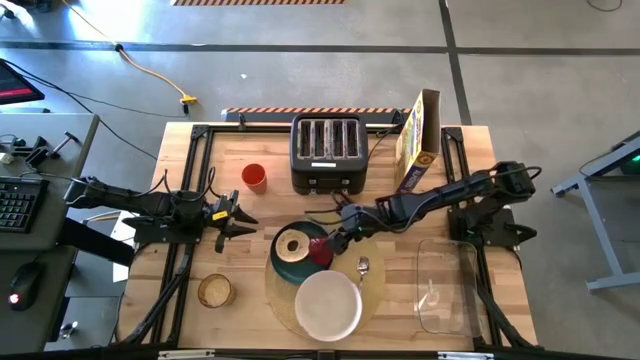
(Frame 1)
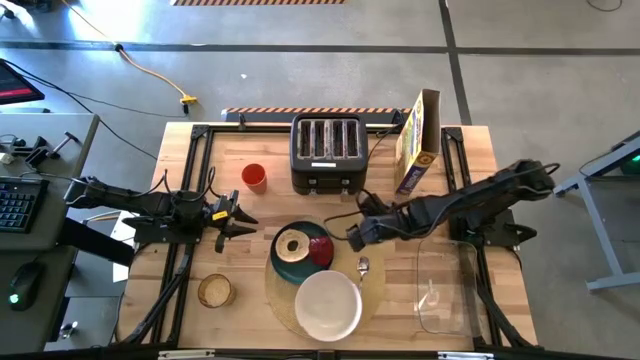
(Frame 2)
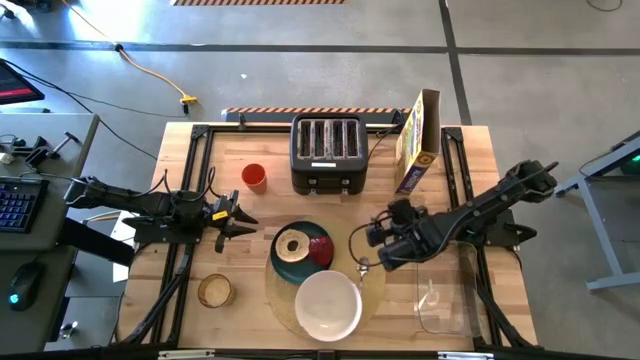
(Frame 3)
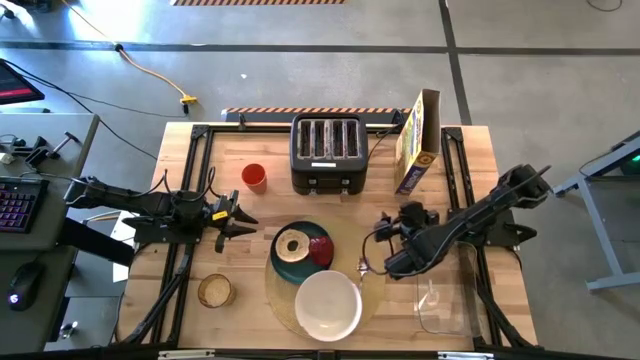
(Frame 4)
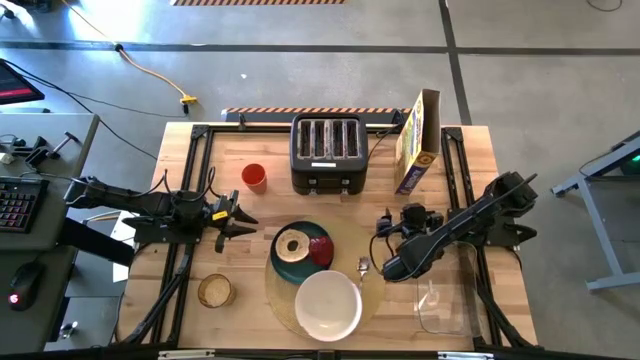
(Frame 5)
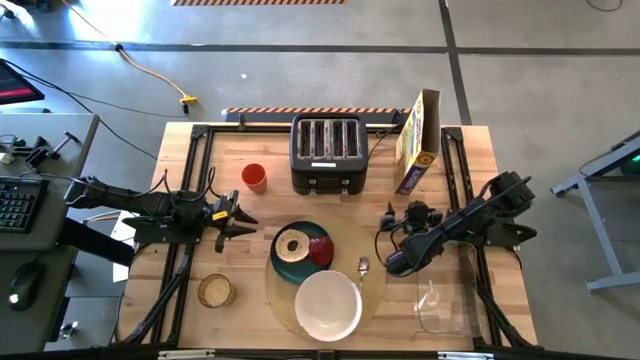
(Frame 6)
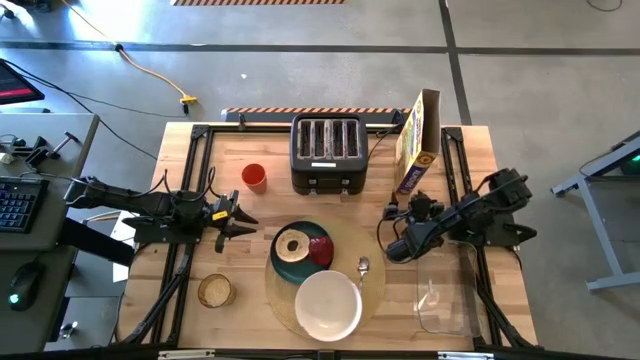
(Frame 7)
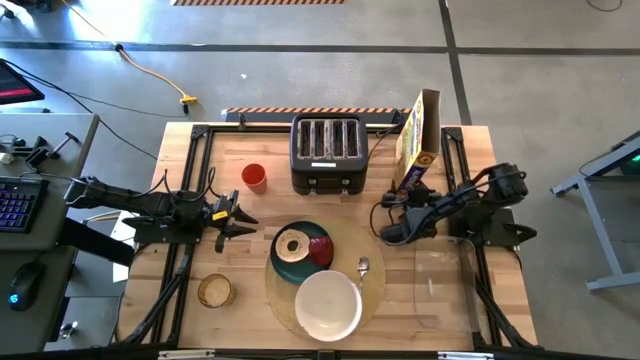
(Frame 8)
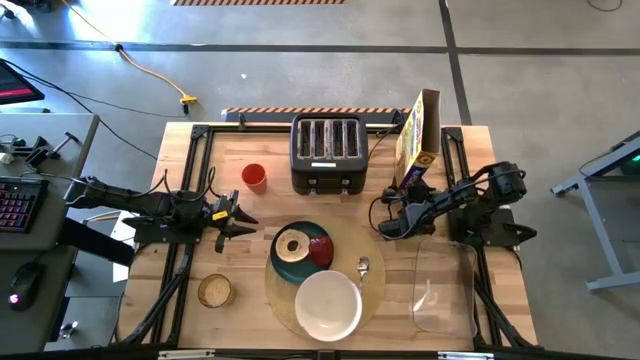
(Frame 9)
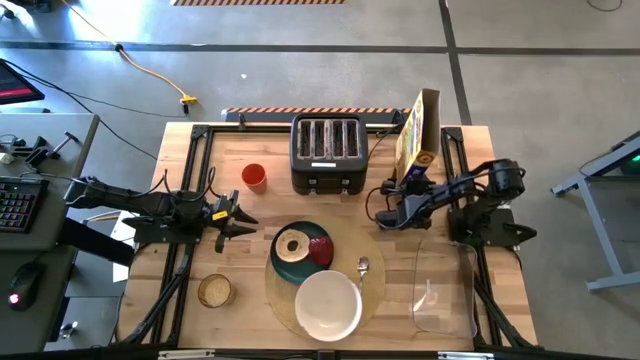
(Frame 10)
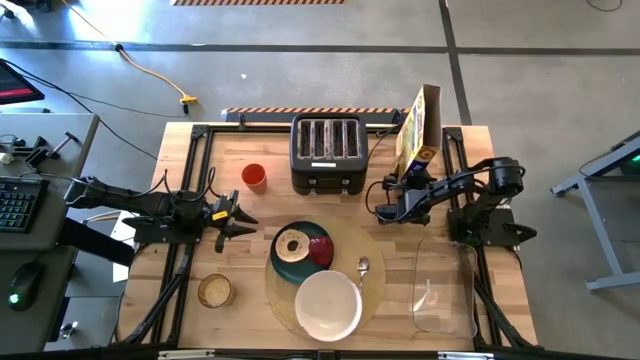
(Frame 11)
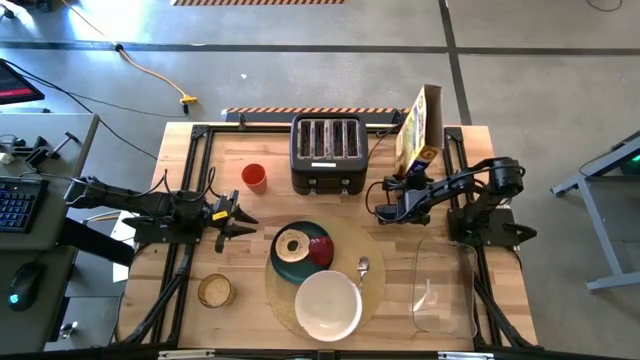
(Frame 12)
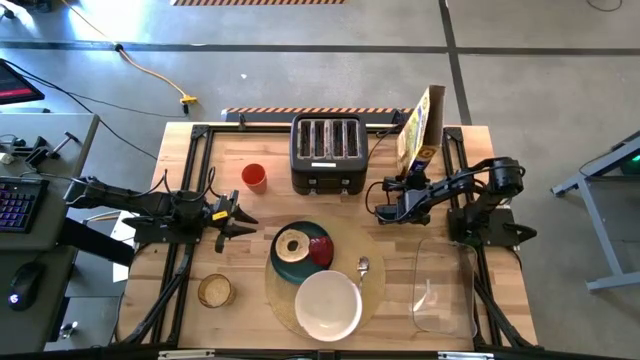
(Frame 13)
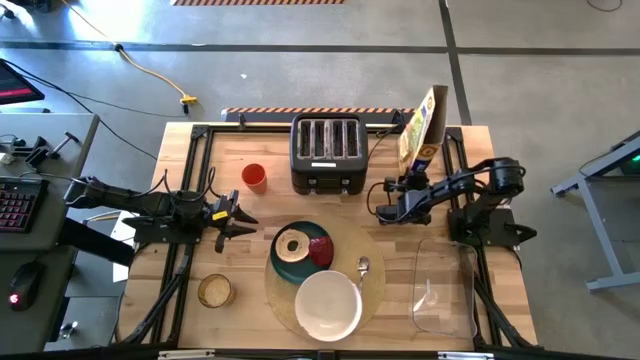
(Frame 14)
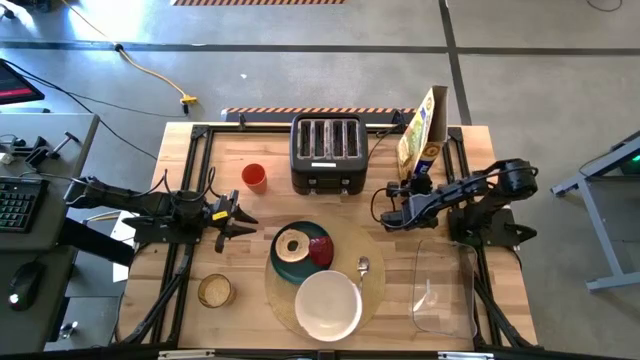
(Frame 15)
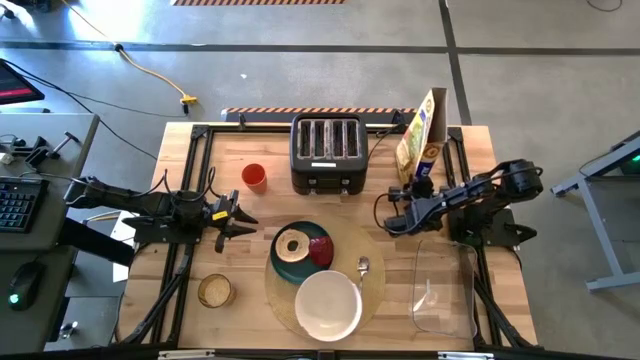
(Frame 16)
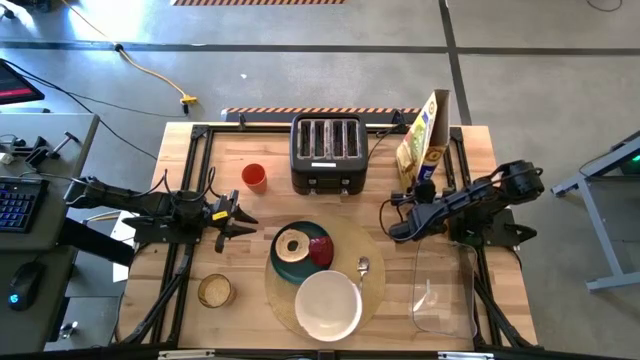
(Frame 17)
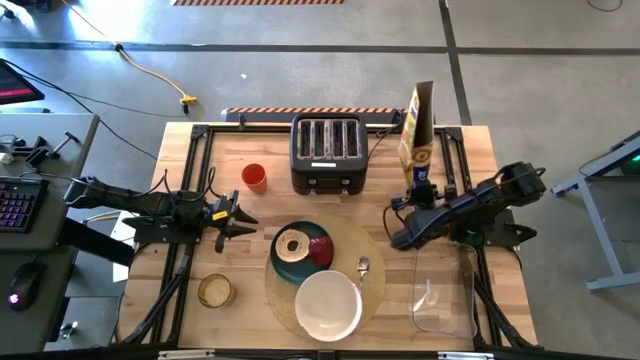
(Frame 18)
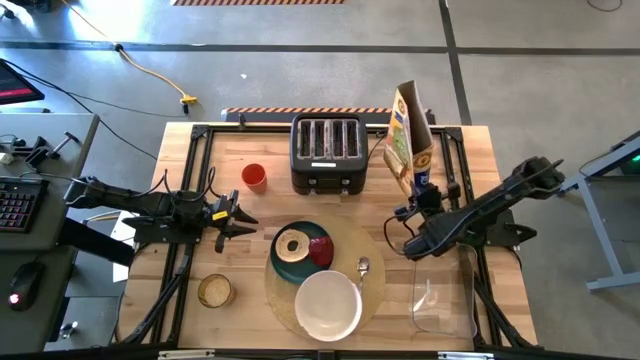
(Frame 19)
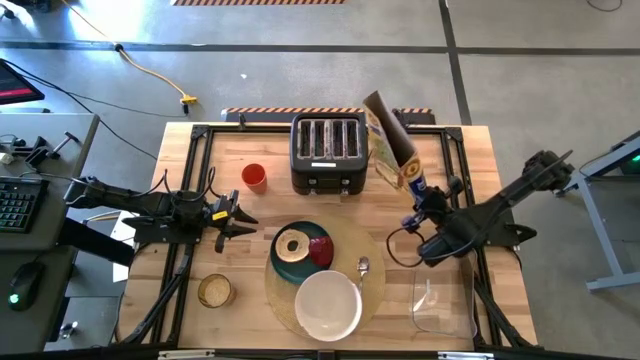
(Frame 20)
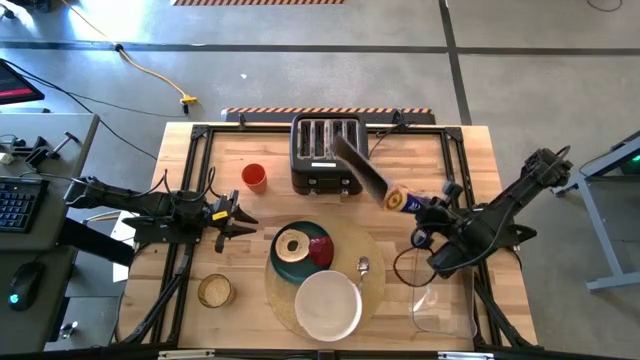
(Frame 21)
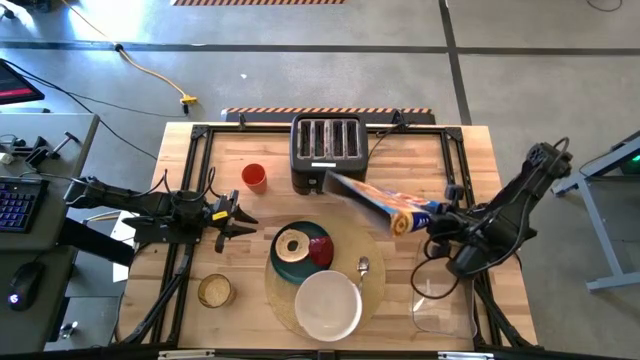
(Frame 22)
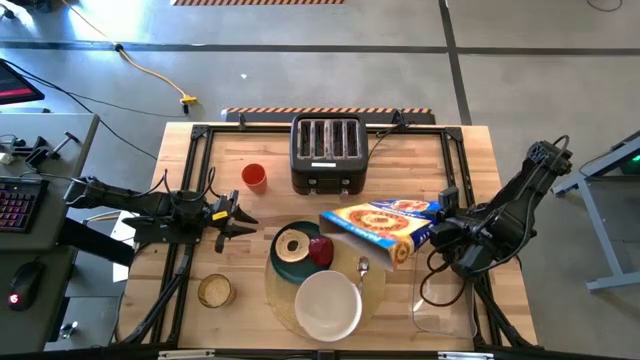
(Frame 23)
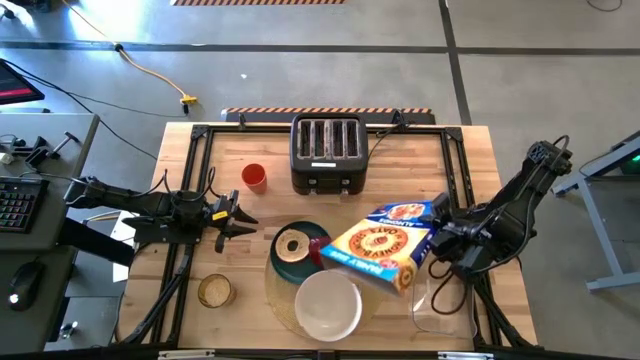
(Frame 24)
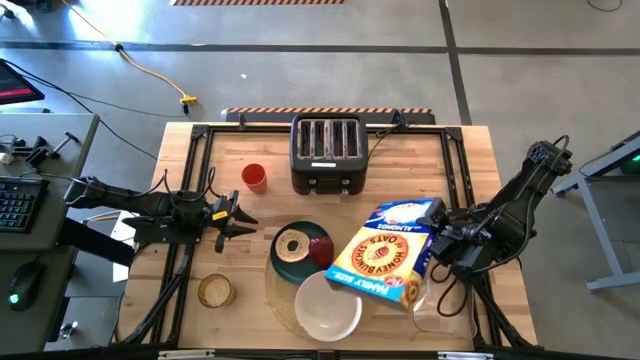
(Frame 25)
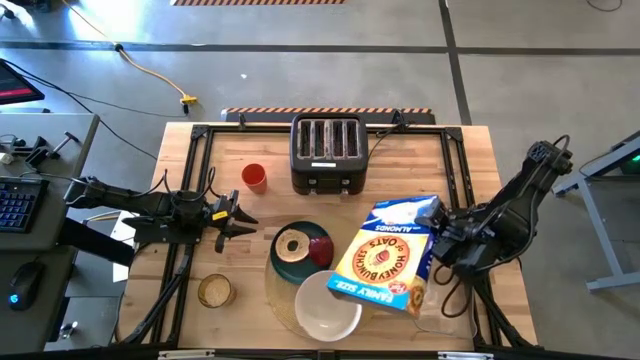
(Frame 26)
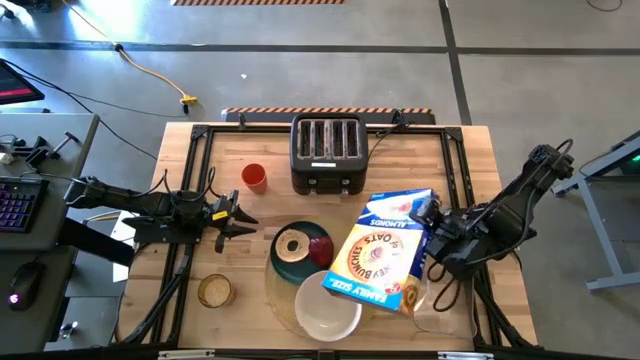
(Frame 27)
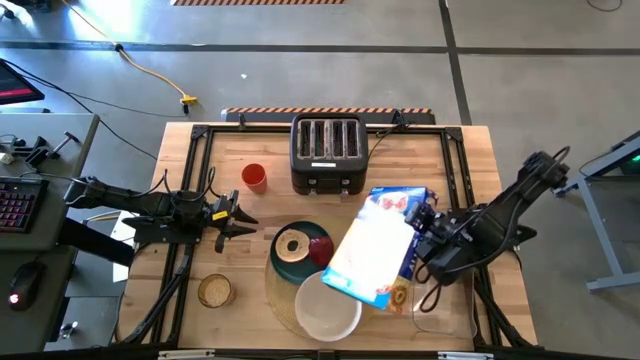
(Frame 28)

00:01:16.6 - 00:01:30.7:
Task: Arrange a breakfast setting
Pour the cereal into the white bowl

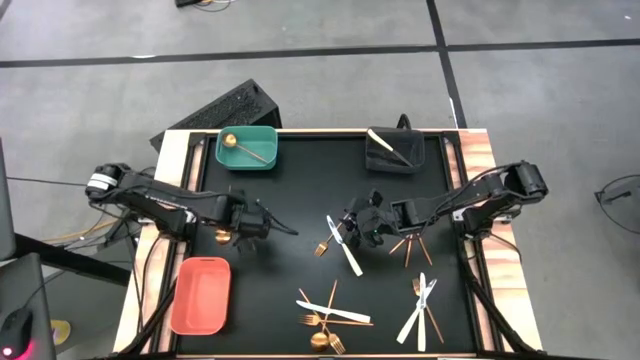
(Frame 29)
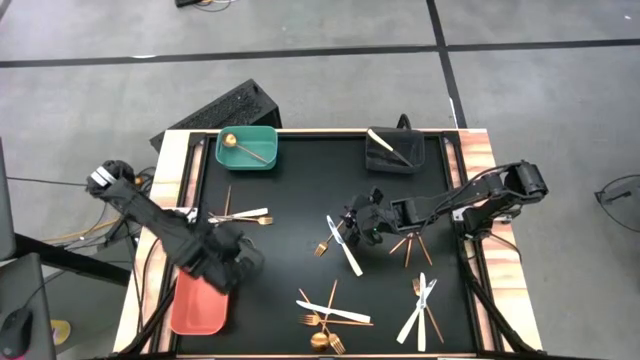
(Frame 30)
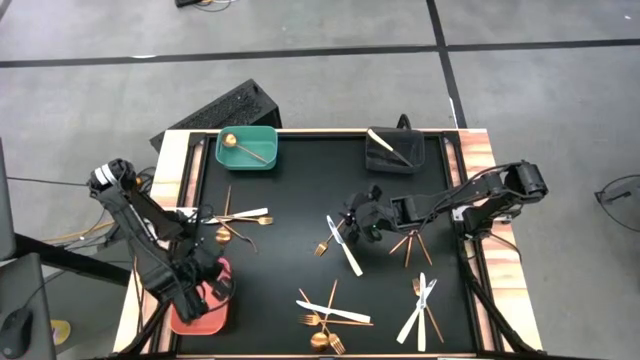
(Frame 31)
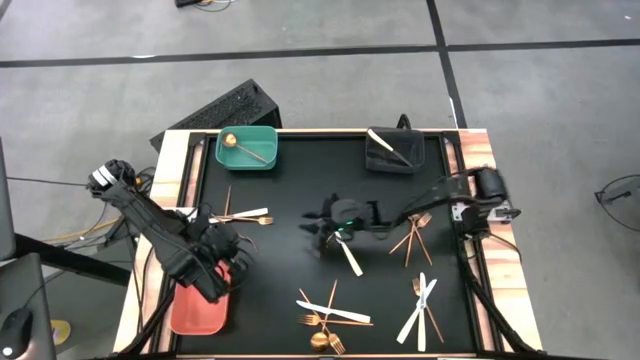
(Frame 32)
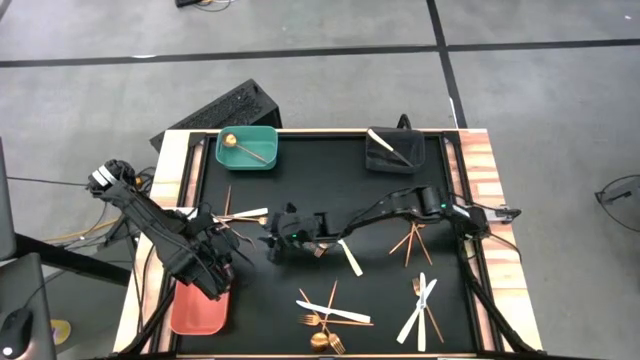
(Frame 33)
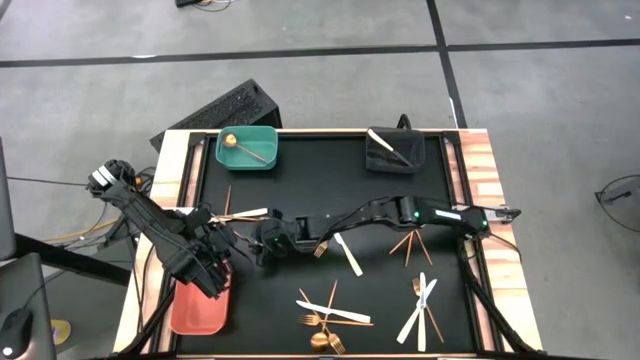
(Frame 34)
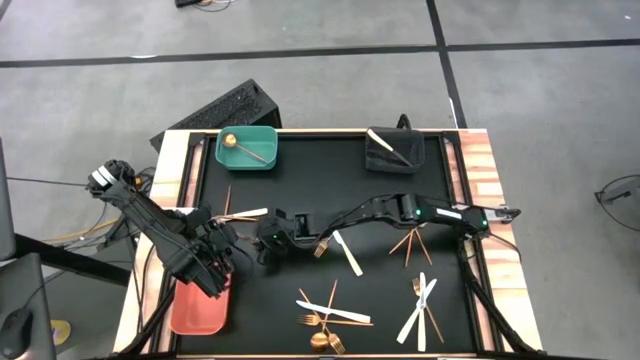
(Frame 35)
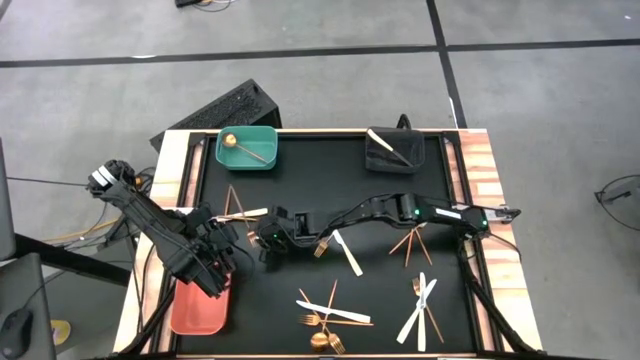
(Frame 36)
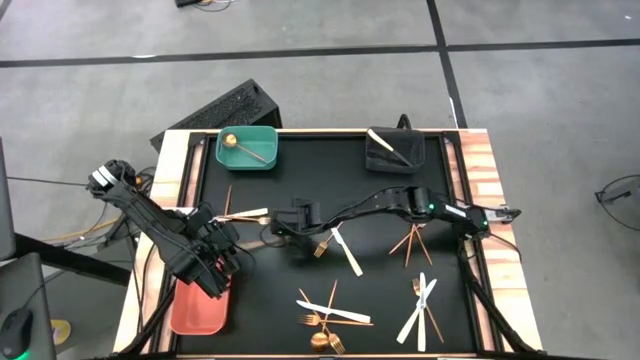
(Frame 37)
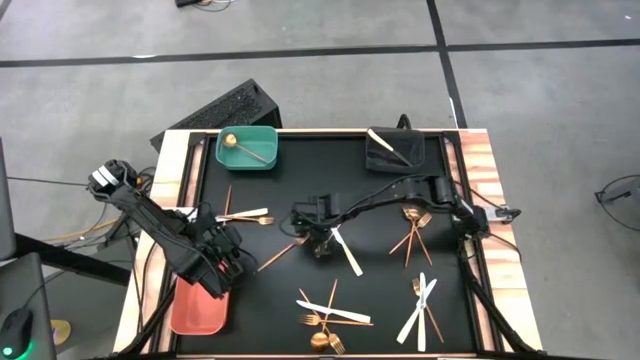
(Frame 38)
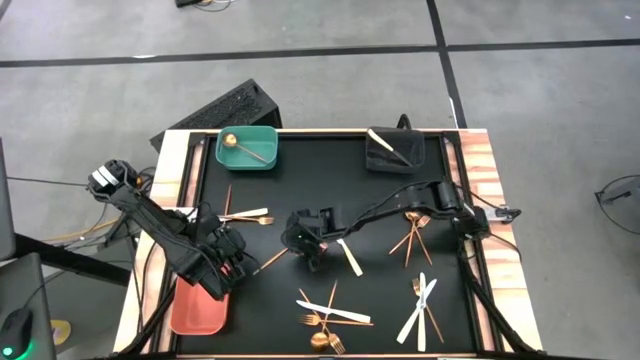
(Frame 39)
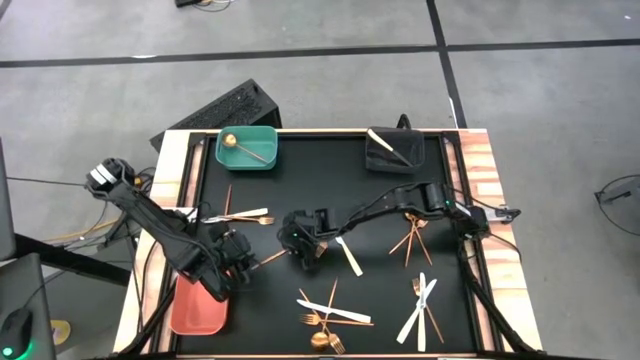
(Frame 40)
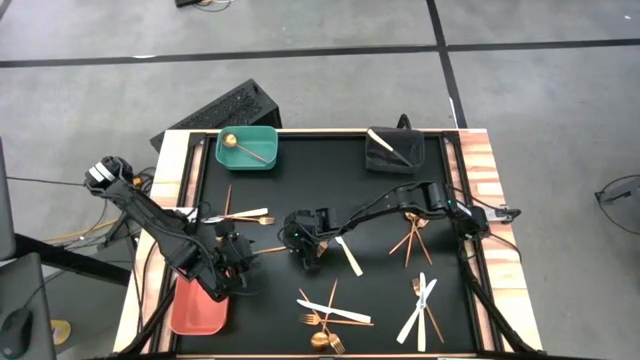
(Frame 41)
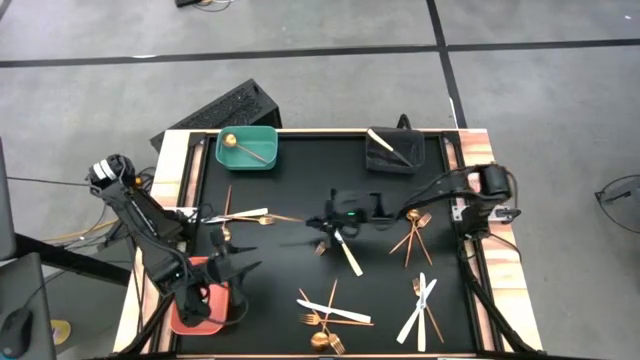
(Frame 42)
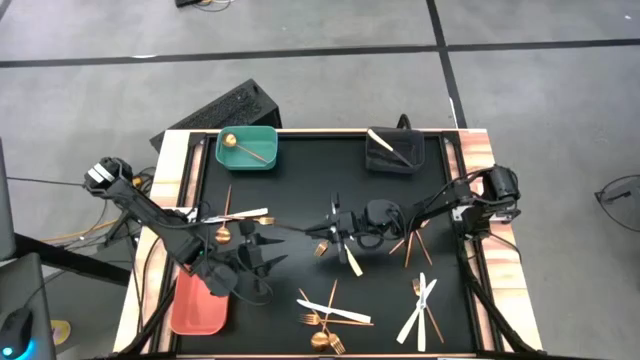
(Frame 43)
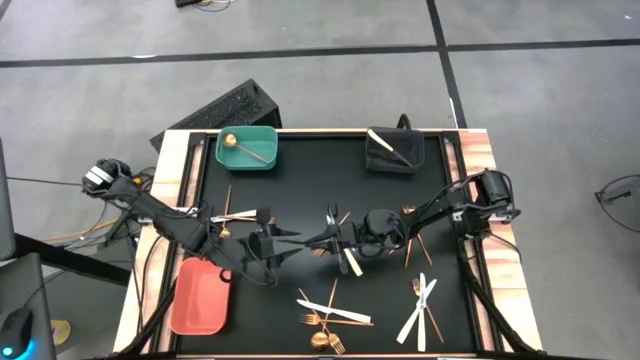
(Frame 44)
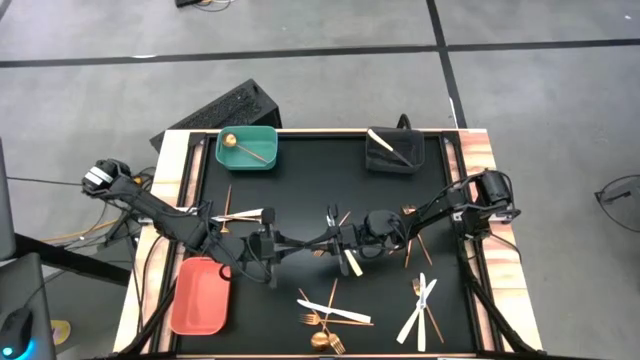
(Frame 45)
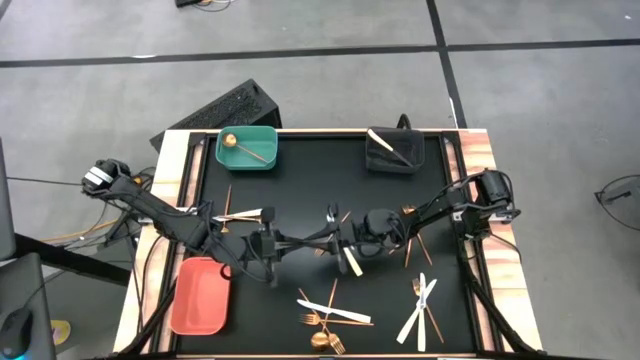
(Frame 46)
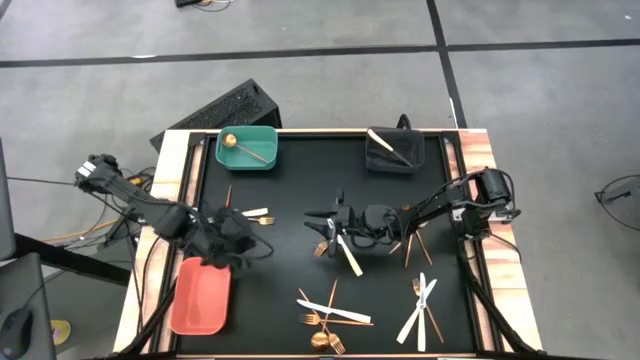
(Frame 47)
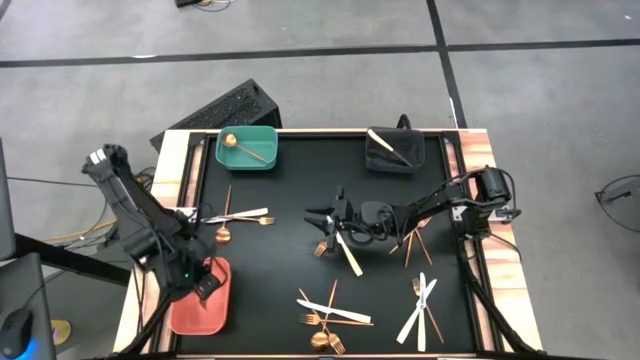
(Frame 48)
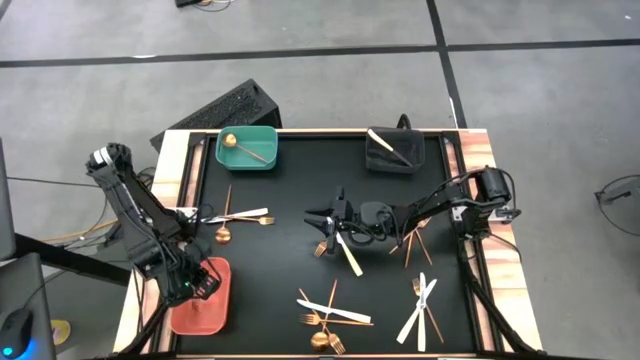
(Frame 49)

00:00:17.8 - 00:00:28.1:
Task: Sort silverware by color (type)
Put the gold fork into the orange bin
